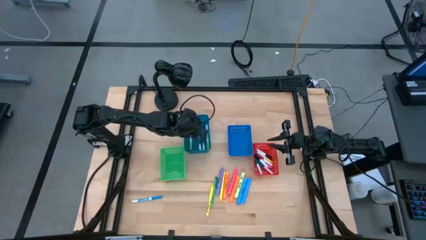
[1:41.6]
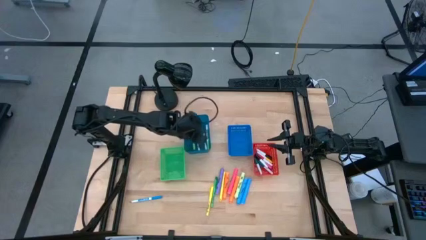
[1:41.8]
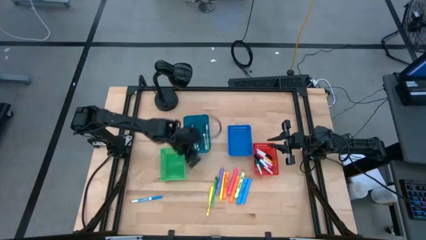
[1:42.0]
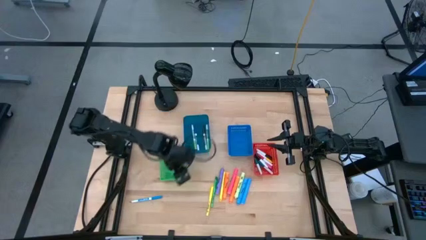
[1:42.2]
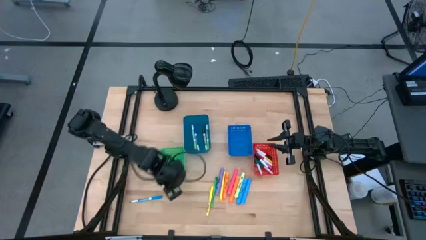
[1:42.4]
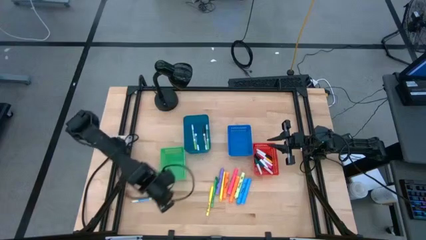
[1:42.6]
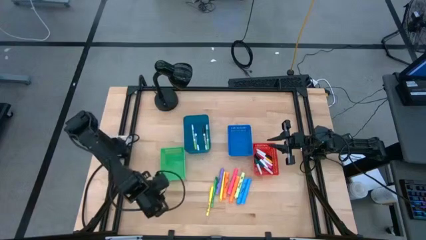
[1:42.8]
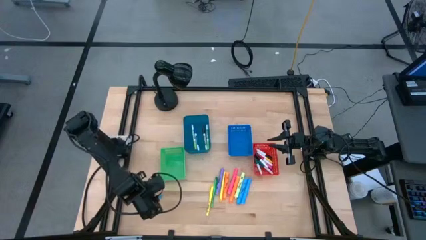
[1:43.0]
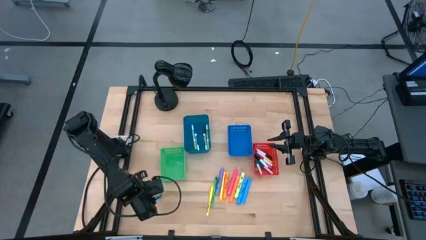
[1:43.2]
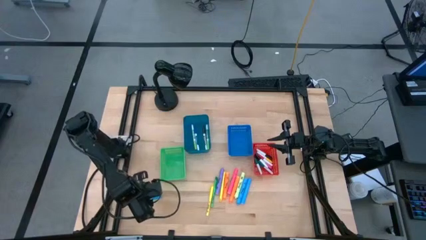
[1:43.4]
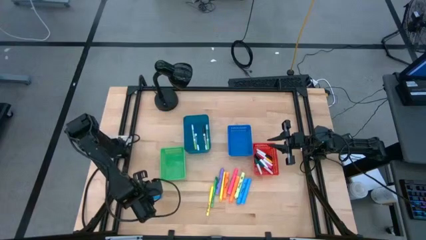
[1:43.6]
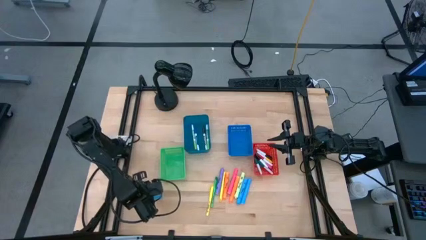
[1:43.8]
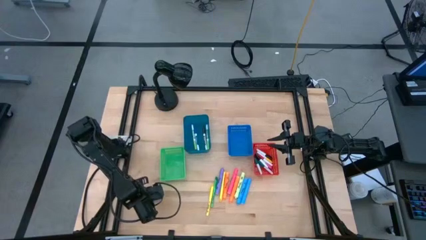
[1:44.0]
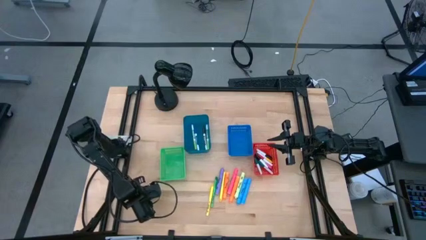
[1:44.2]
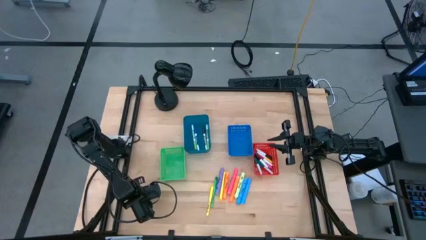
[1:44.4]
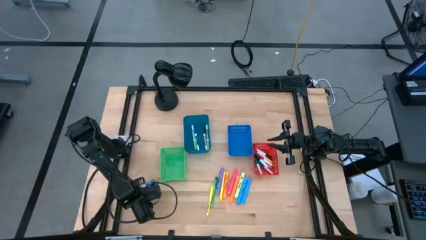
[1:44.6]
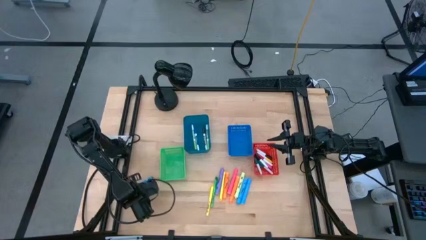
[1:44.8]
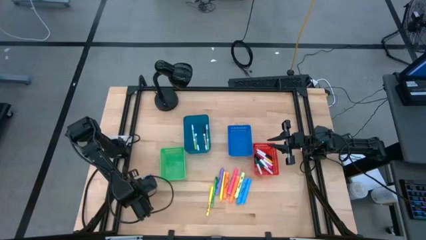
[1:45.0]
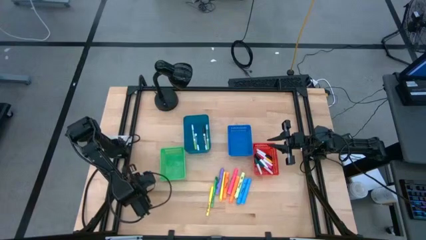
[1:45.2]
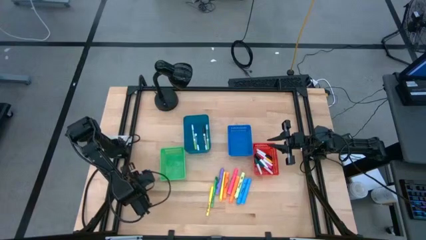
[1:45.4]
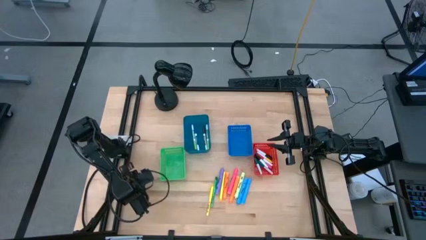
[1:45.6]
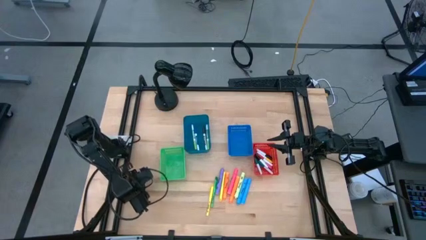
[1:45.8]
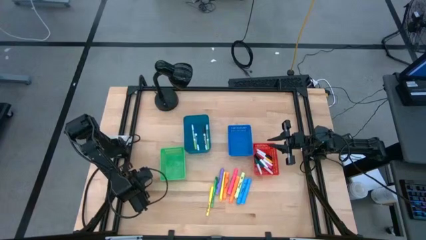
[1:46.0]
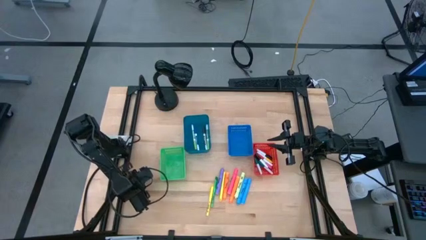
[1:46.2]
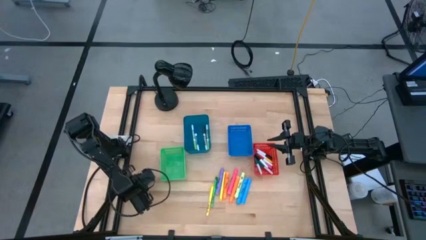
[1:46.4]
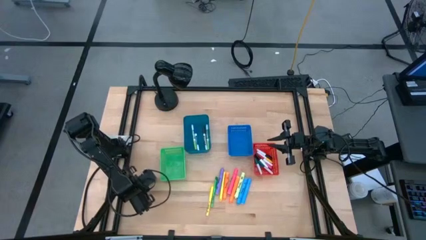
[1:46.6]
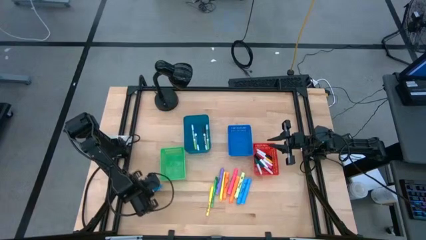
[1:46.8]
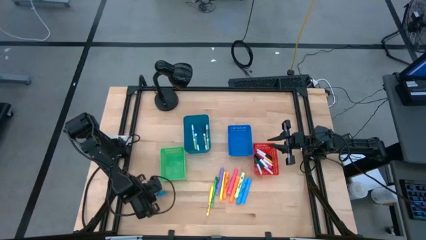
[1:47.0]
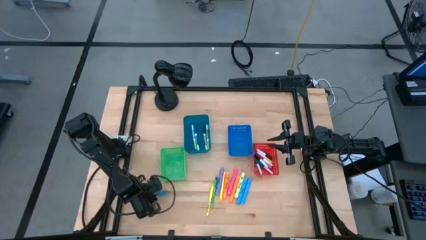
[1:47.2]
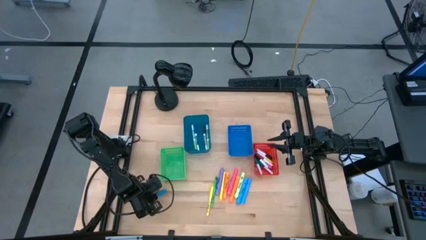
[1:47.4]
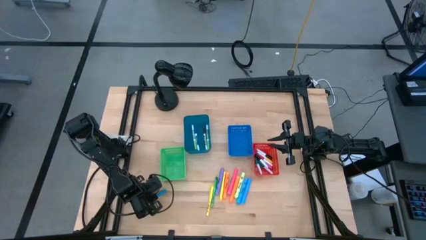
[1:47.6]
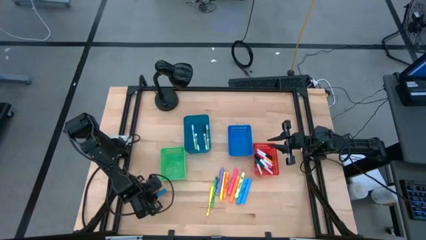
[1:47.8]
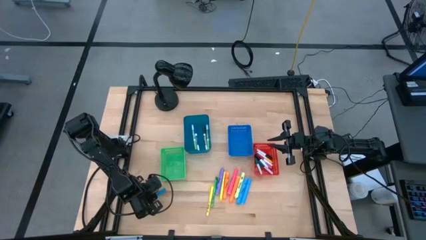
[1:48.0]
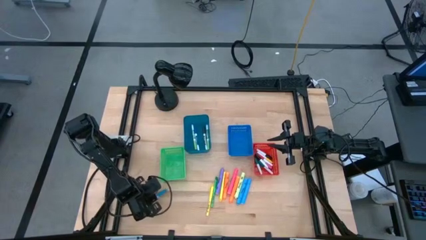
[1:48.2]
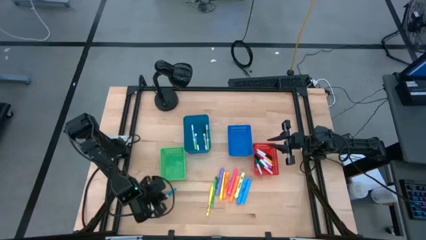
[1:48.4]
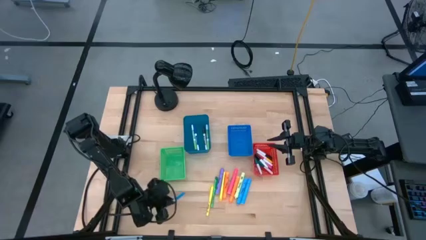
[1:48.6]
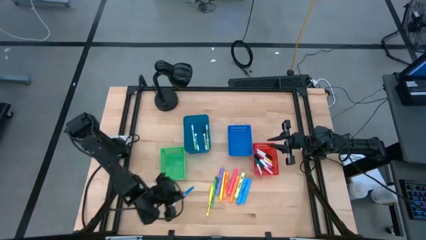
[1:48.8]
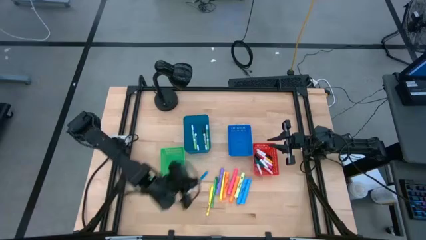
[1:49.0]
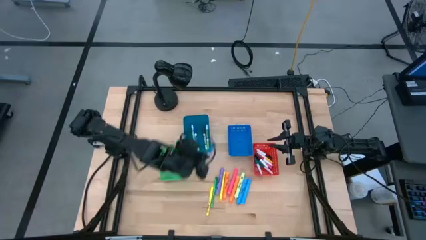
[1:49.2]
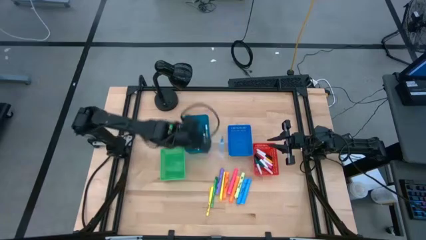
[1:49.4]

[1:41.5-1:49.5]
Task: Pick & Place Markers
Put the blue marker pen into the dark blue bin

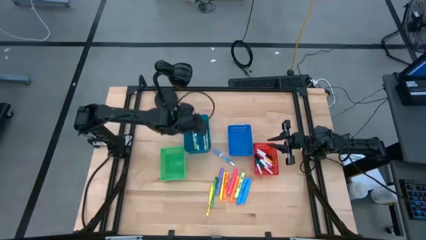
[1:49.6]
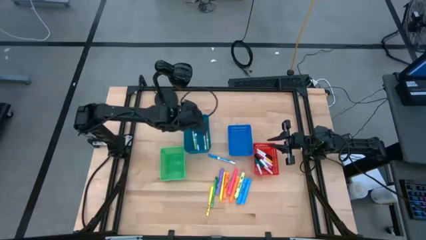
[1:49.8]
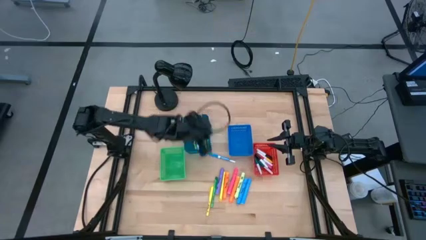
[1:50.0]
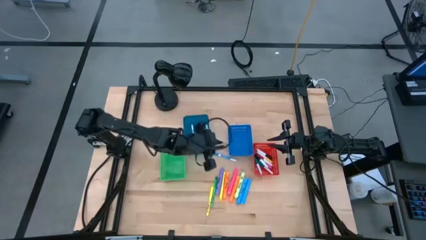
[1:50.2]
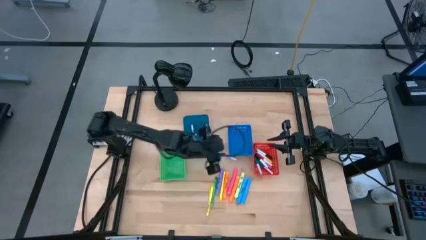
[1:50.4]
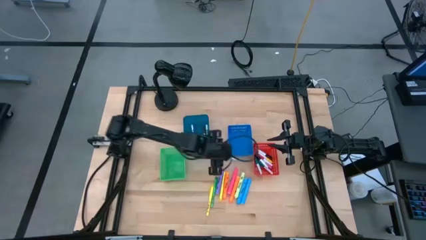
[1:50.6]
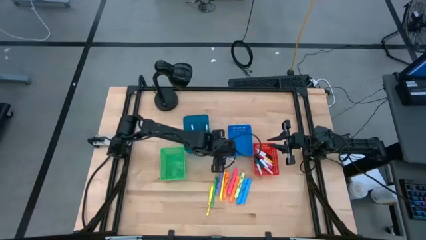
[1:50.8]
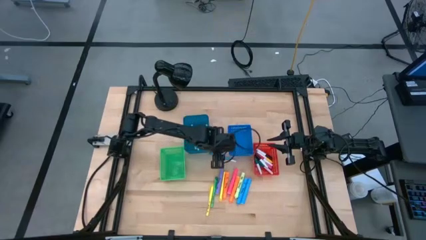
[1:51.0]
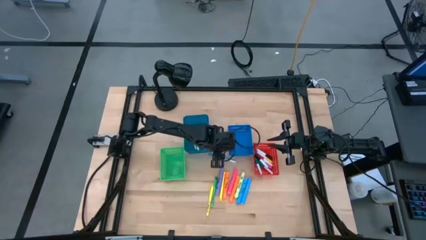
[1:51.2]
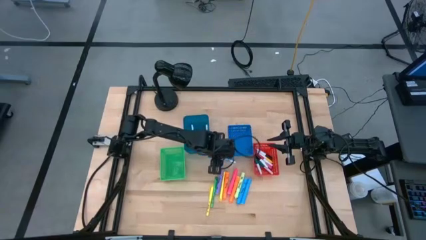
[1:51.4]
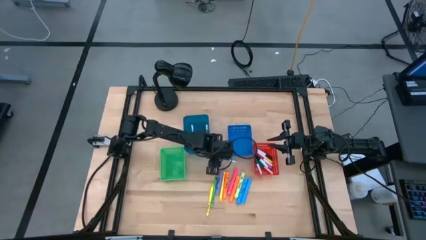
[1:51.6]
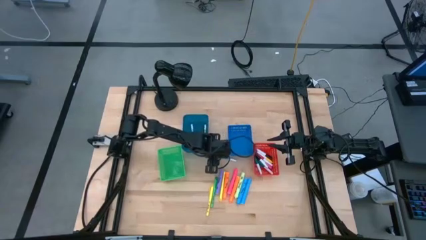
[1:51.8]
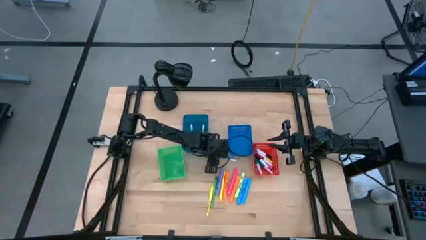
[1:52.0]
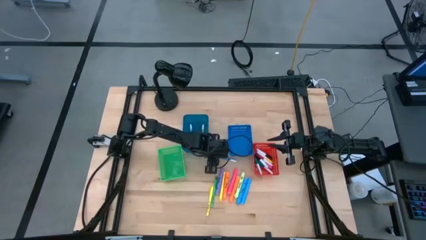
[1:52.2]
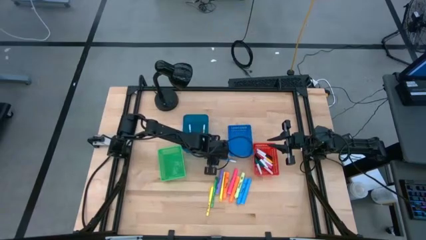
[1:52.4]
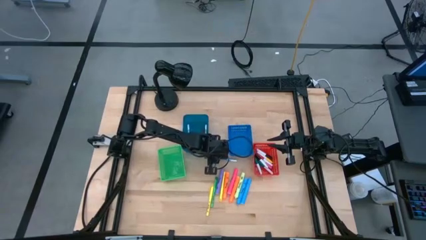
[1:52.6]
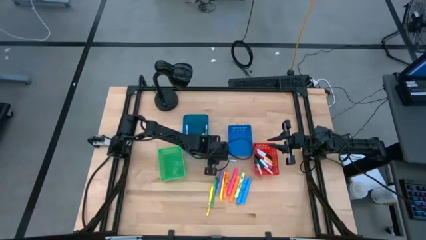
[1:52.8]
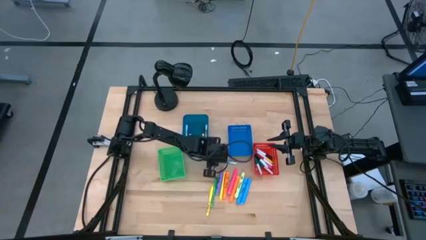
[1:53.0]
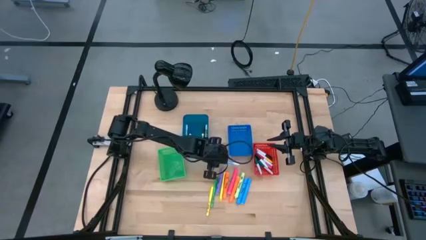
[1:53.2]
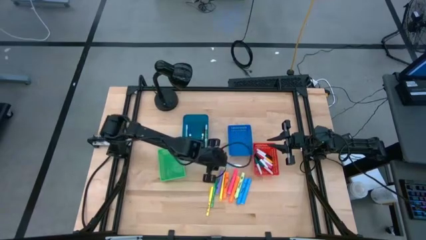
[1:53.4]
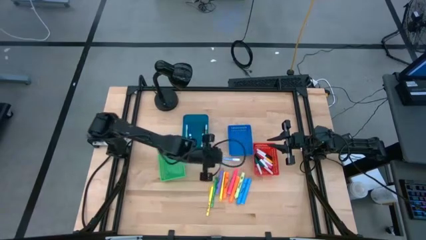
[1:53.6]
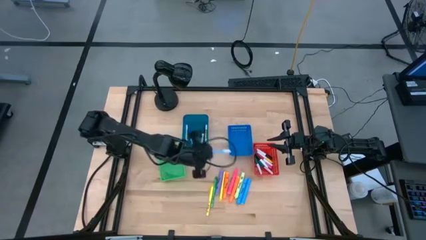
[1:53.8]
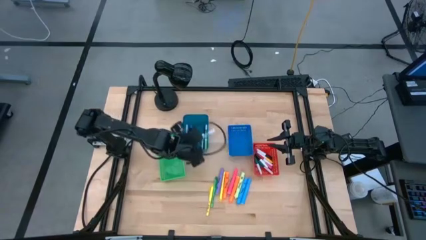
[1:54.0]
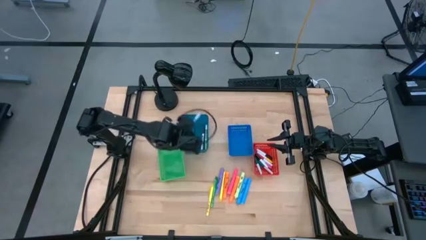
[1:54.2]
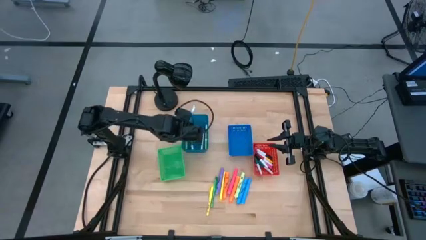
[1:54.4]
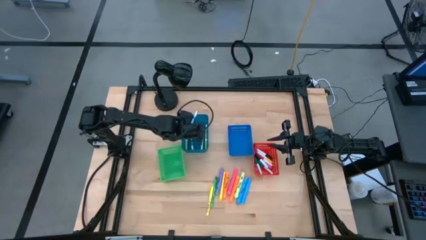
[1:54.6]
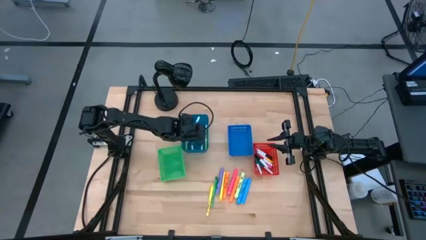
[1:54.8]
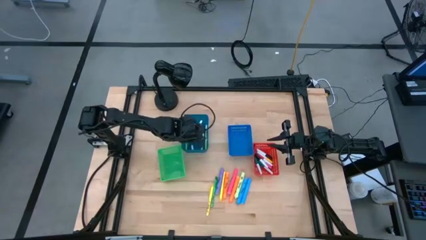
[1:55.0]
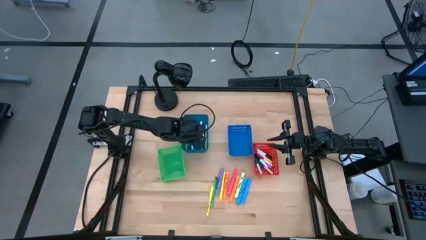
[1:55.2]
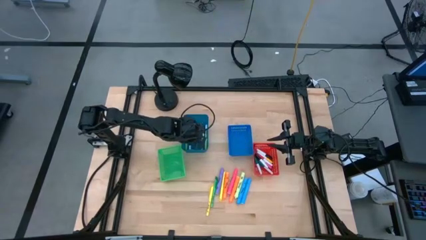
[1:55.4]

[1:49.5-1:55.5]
Put the blue marker pen into the dark blue bin

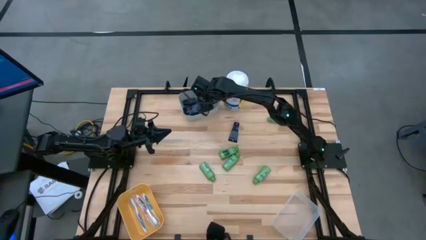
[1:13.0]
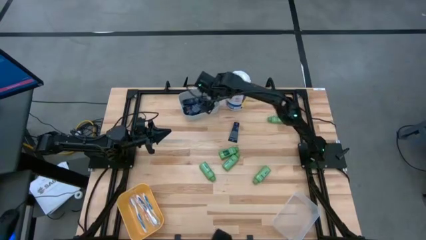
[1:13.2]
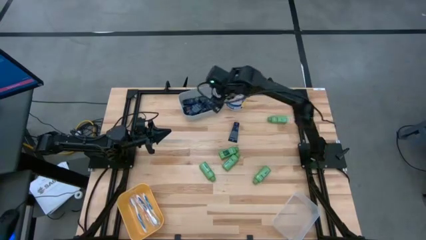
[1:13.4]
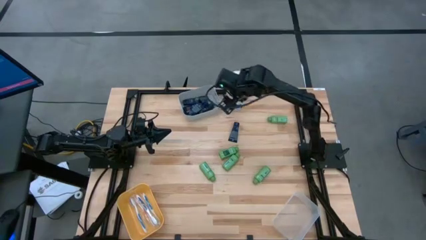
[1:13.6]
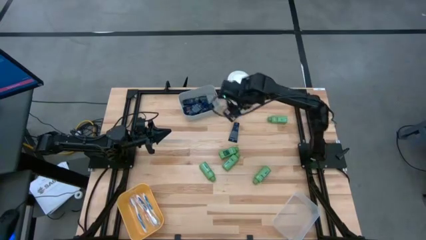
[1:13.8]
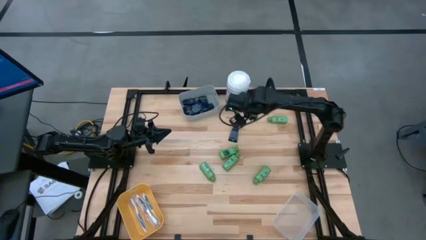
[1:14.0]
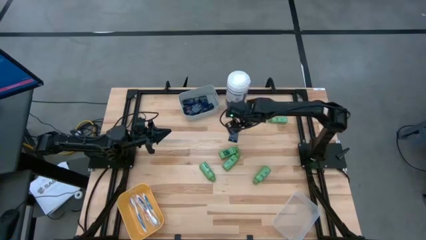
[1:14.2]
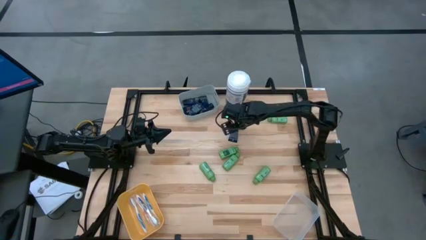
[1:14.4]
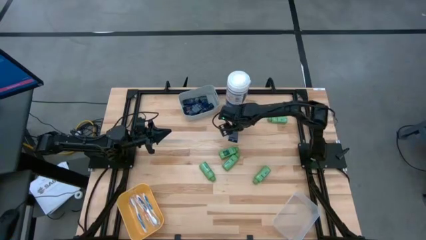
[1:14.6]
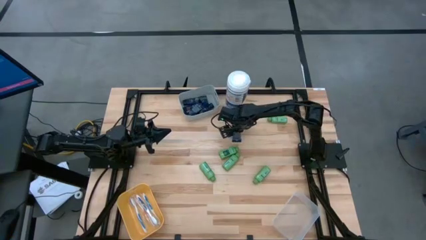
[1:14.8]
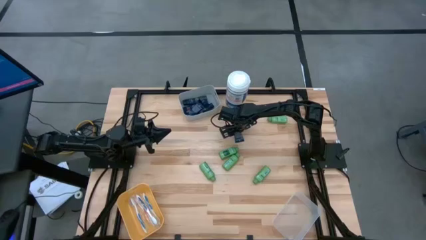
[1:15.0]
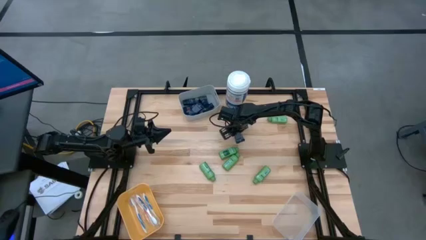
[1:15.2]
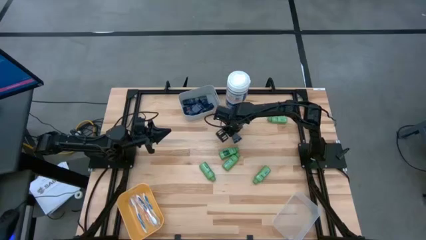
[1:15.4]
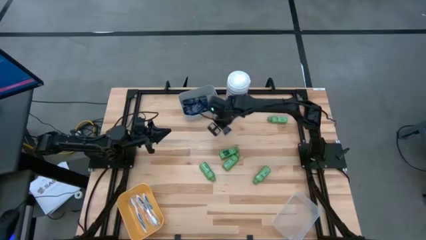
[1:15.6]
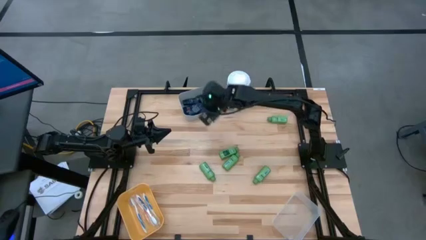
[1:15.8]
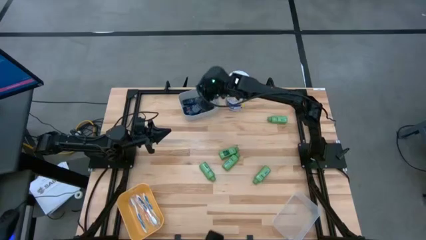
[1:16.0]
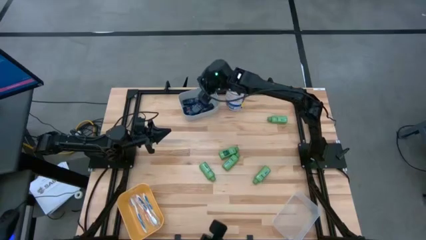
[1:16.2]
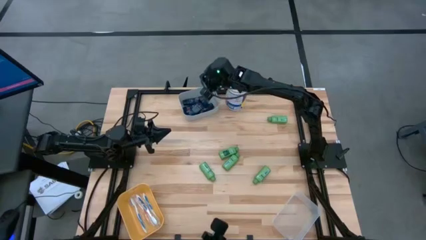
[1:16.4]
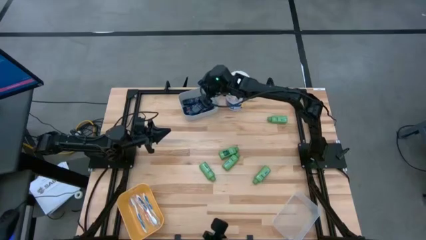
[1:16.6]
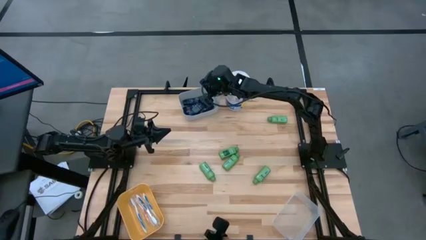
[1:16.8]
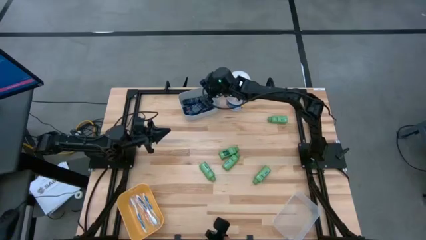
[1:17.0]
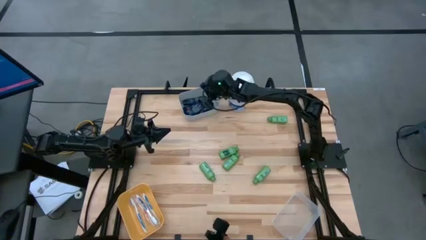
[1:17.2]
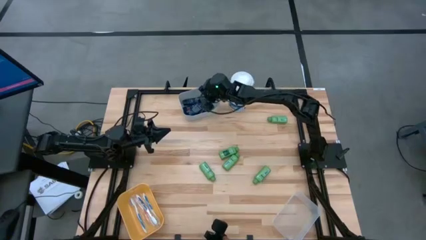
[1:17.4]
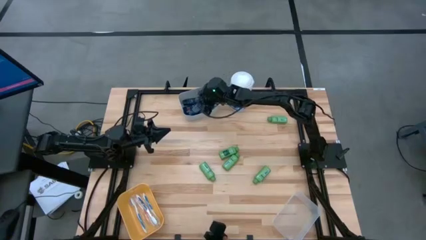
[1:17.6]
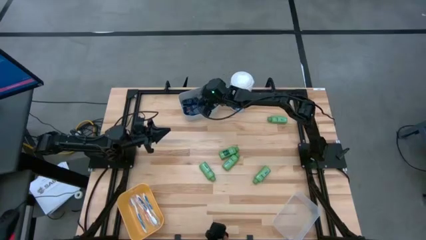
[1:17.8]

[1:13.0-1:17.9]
Task: Pick & Place Travel size toiletries
Put the dark blue shave cream into the gray bin
